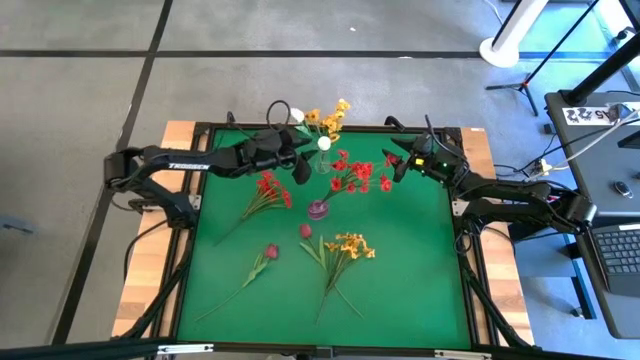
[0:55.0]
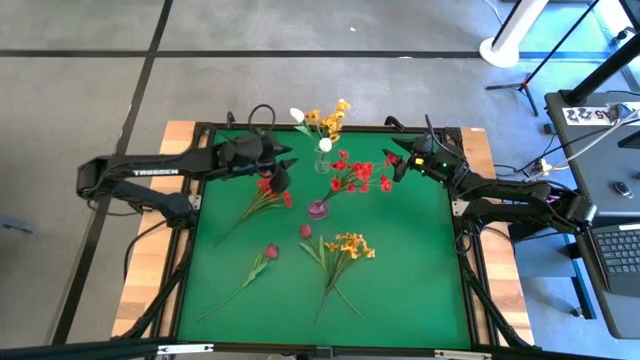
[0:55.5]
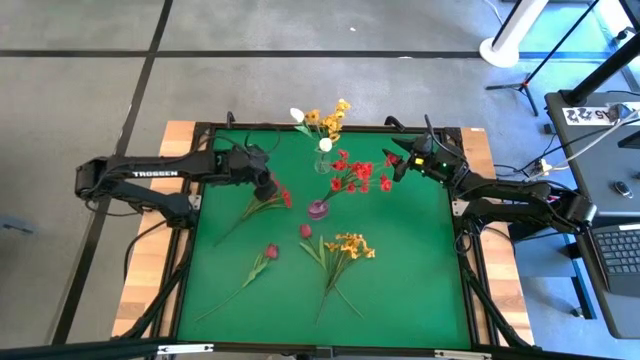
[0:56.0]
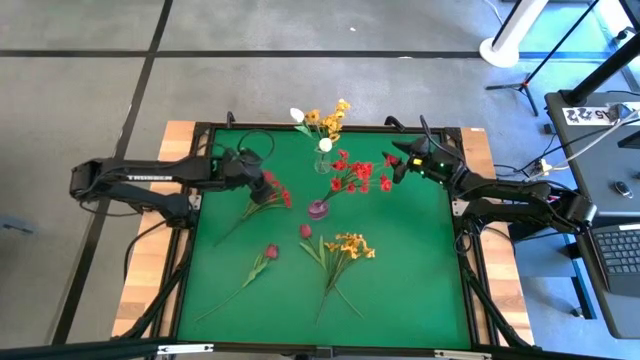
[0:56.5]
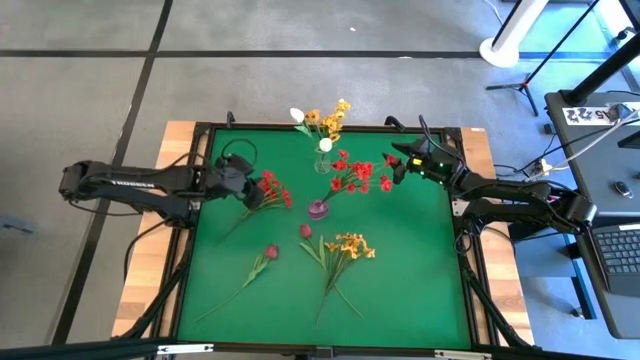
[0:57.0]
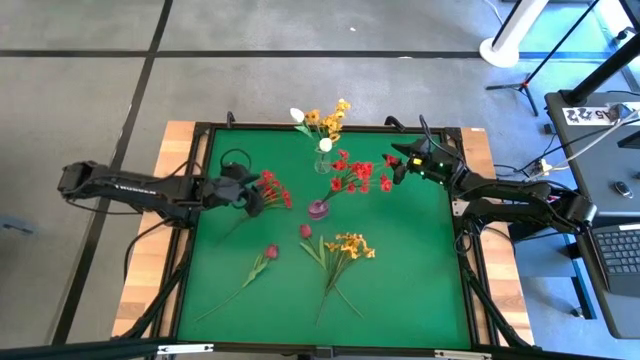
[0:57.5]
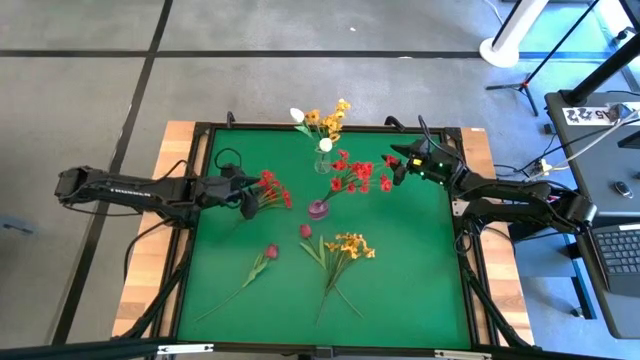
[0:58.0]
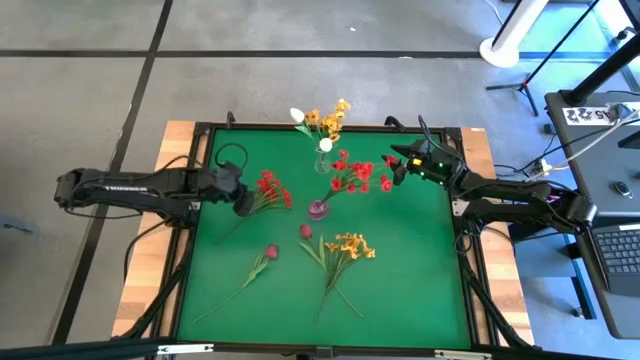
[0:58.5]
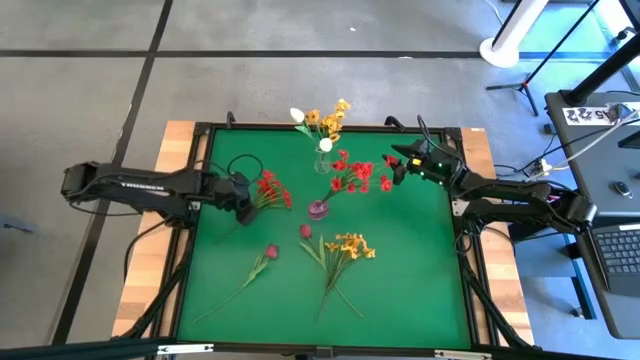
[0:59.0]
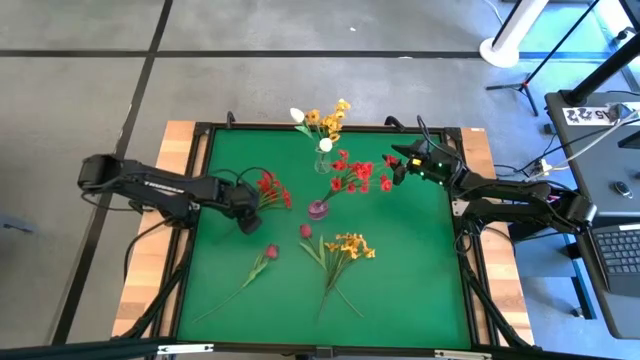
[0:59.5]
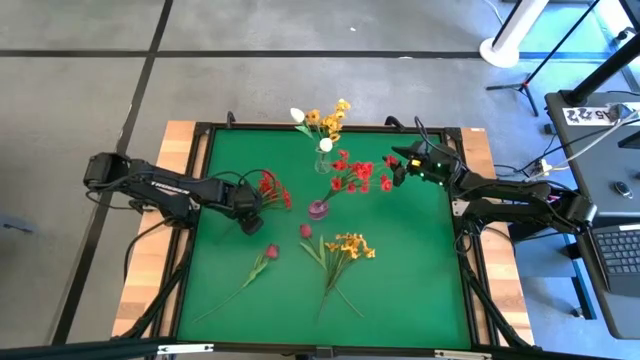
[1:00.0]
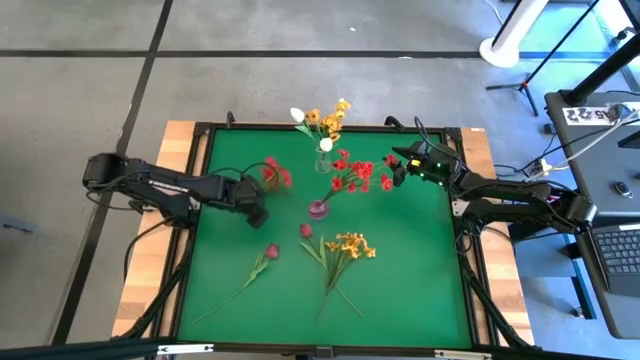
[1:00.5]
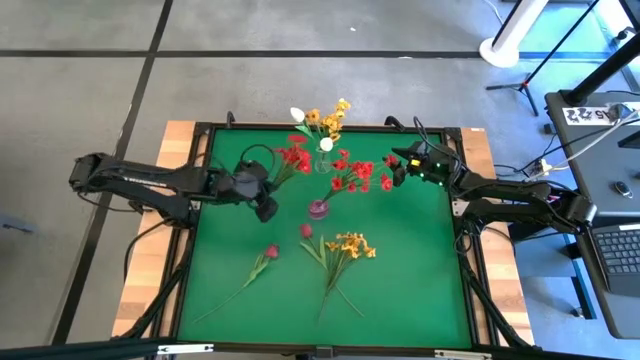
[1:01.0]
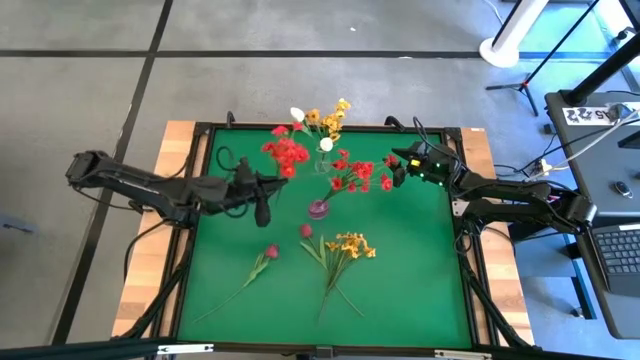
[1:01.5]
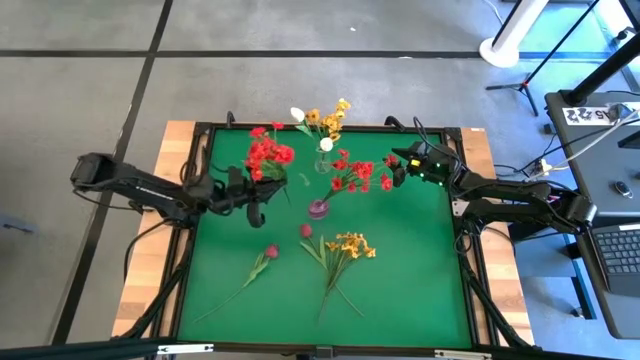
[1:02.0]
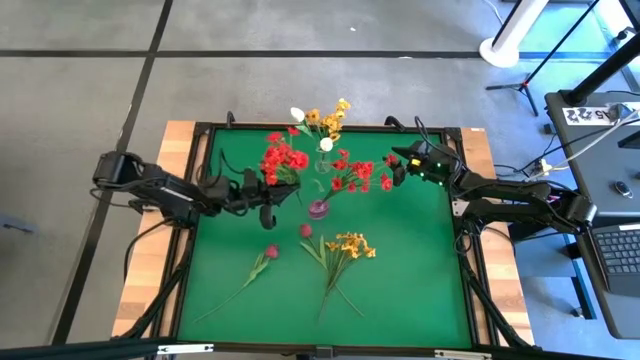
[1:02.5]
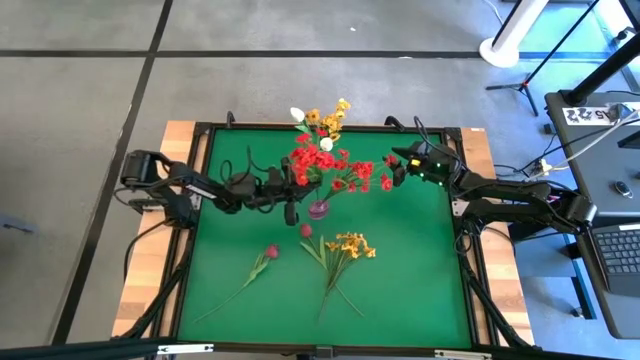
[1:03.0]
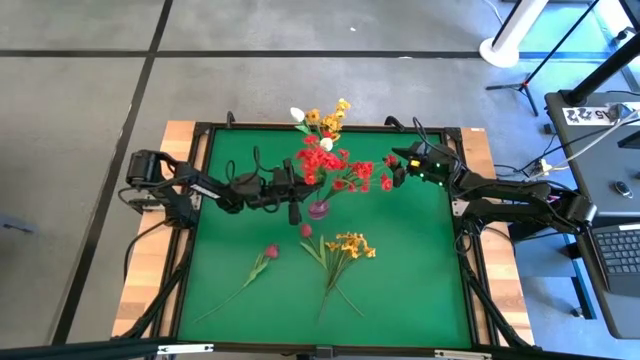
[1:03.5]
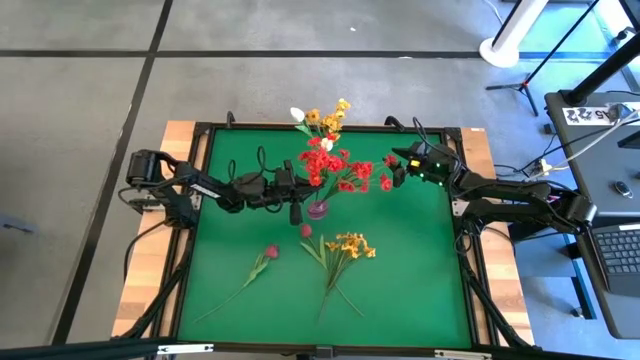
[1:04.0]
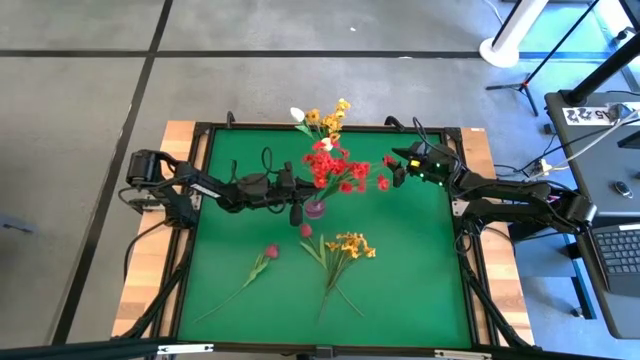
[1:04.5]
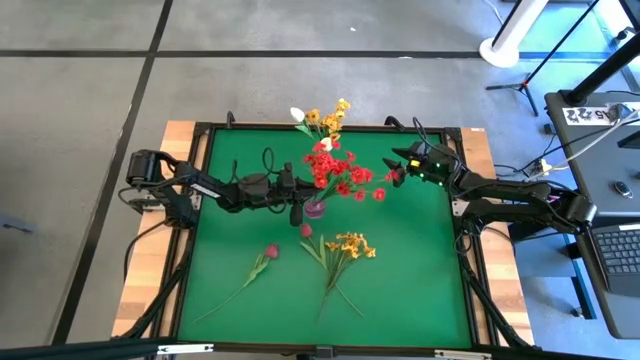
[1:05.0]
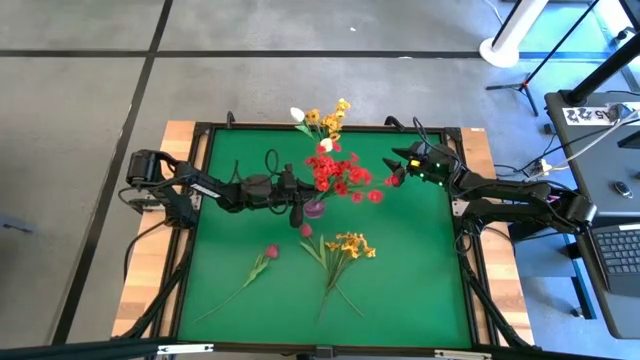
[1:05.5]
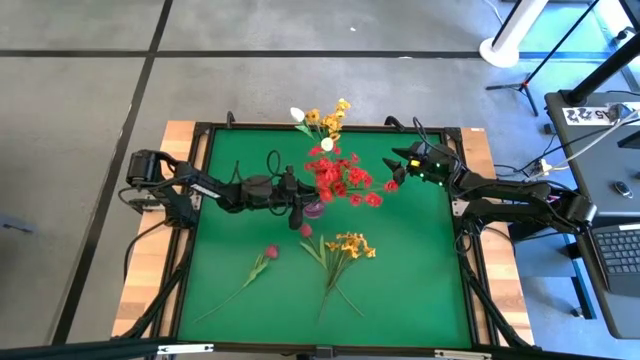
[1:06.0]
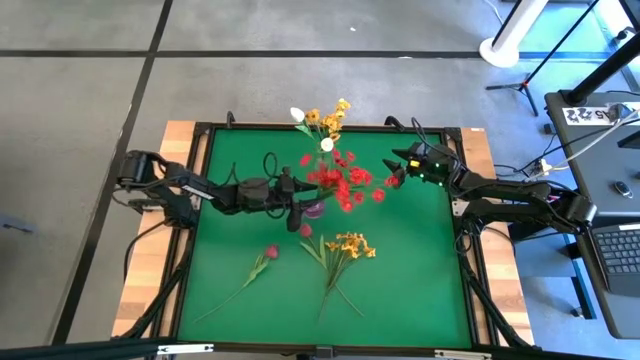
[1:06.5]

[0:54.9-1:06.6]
Task: Sort flowers into vase by color
Put the red flowers into the violet vase

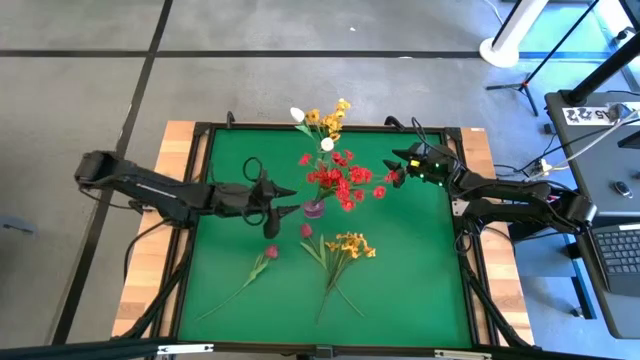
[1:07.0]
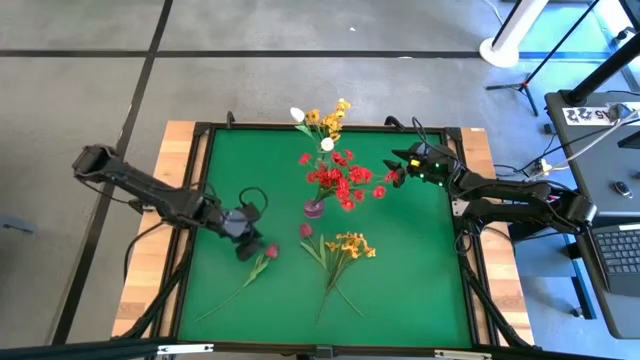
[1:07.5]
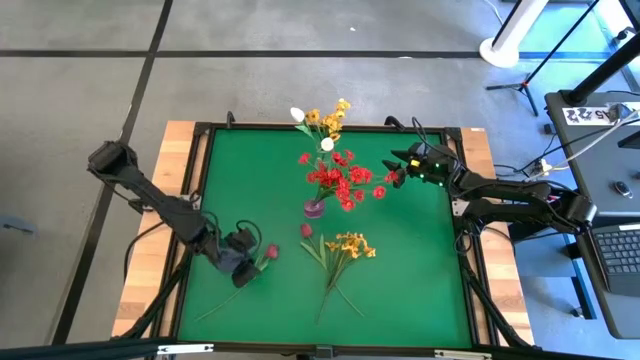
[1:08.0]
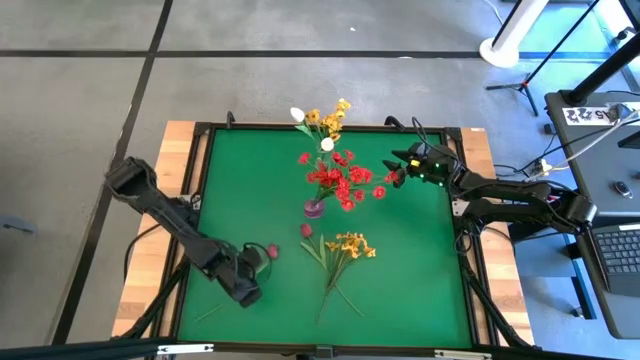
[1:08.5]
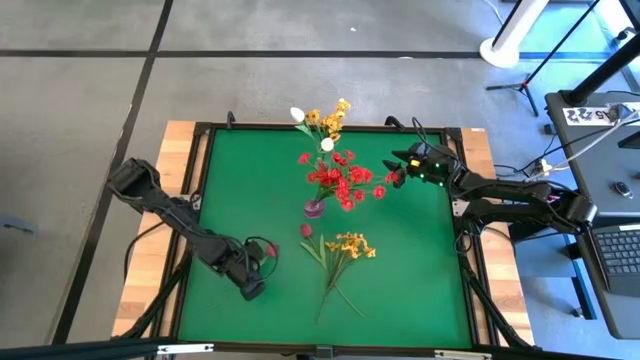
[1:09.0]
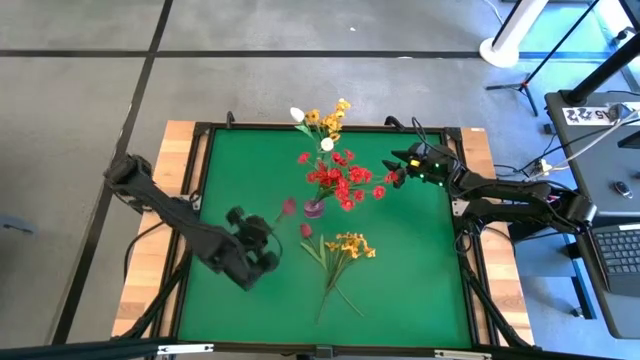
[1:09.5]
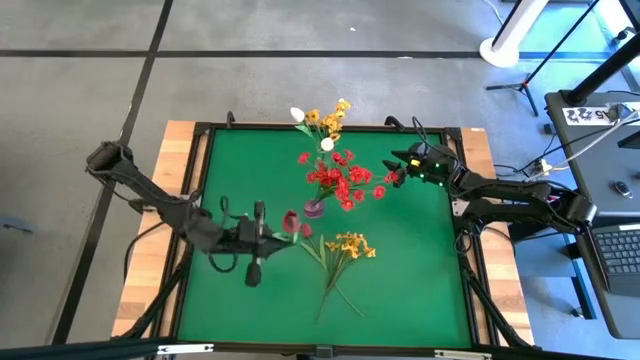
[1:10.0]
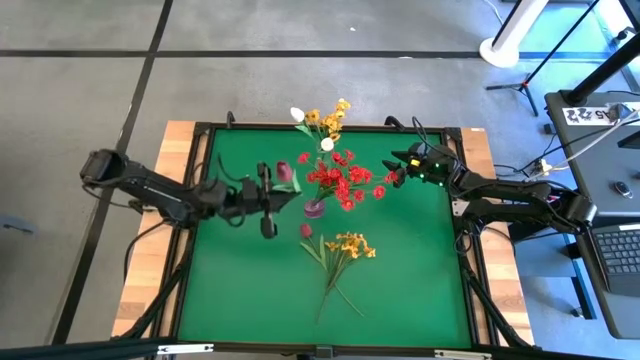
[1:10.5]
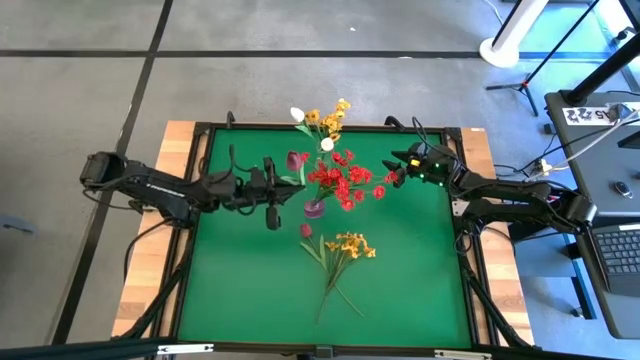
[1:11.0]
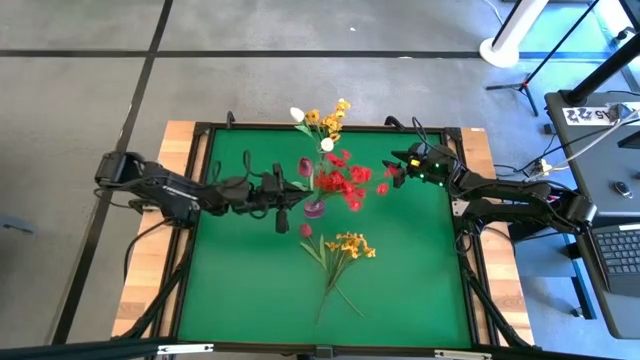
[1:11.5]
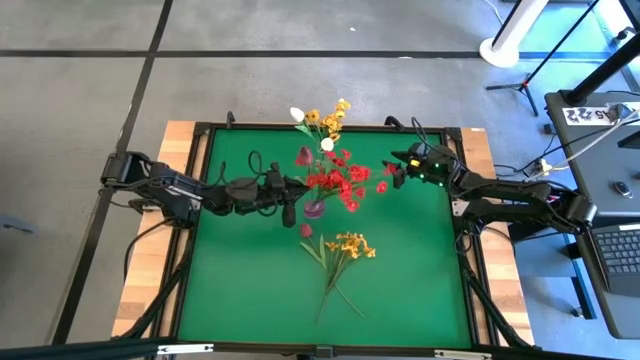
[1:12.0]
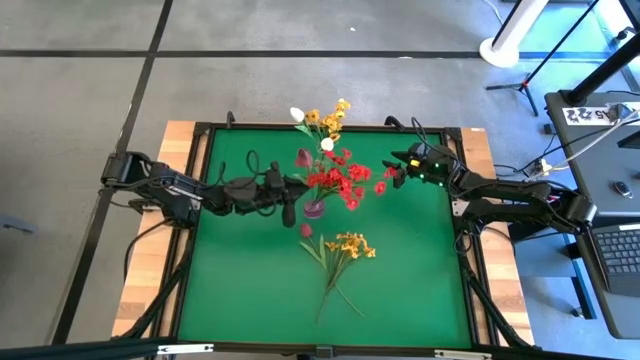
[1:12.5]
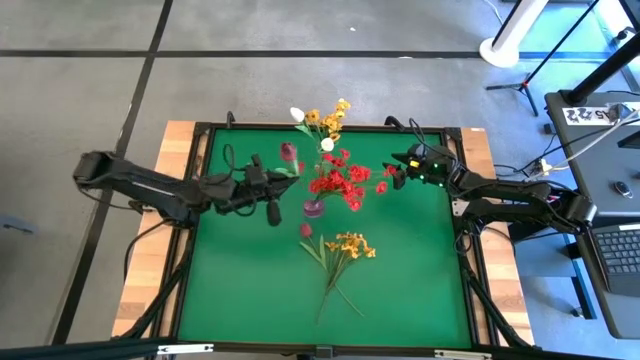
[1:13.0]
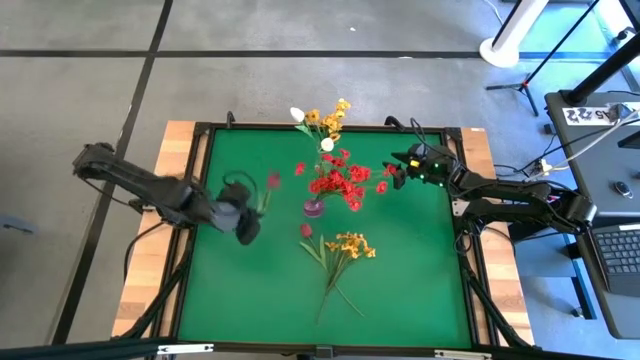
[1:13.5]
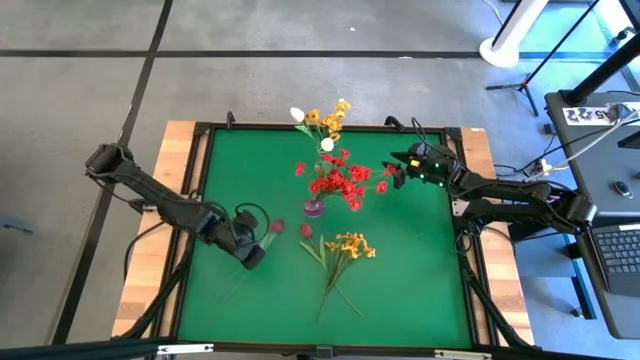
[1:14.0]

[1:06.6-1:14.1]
Put the left red tulip into the violet vase

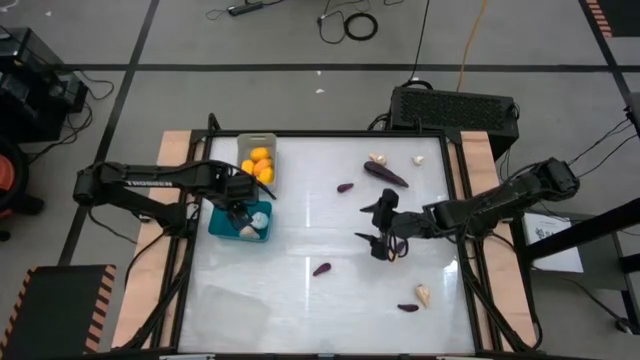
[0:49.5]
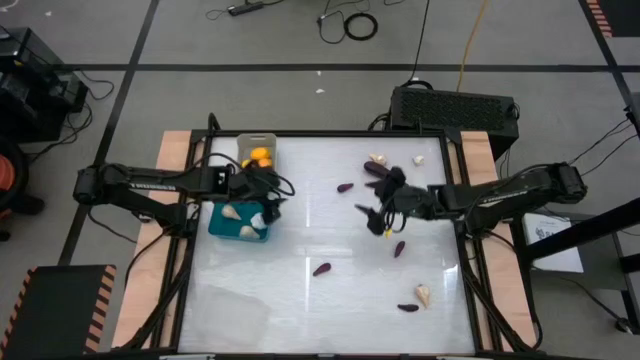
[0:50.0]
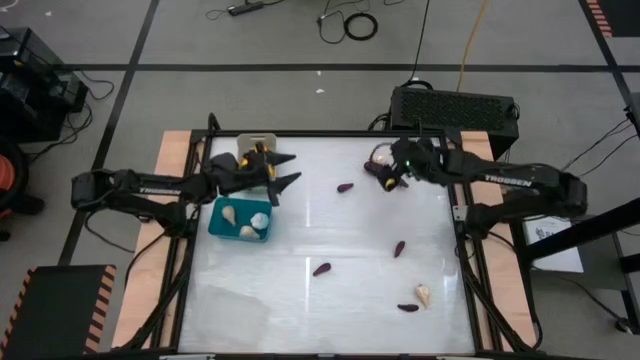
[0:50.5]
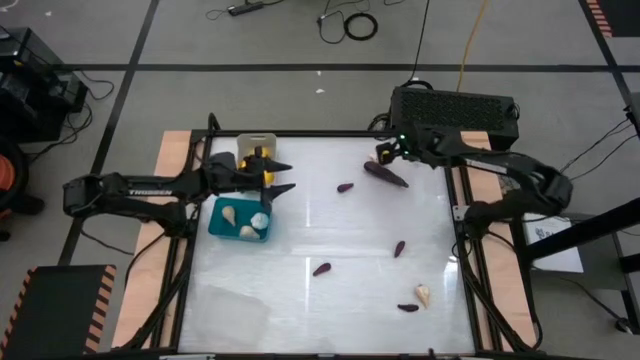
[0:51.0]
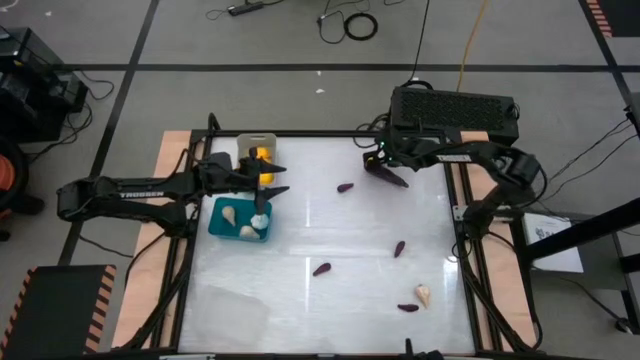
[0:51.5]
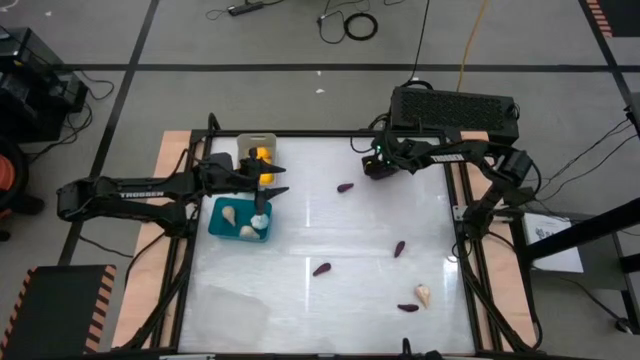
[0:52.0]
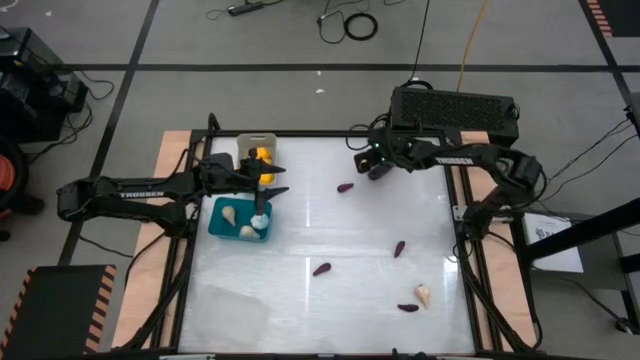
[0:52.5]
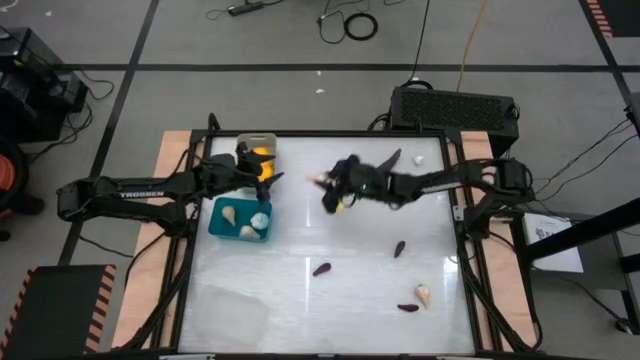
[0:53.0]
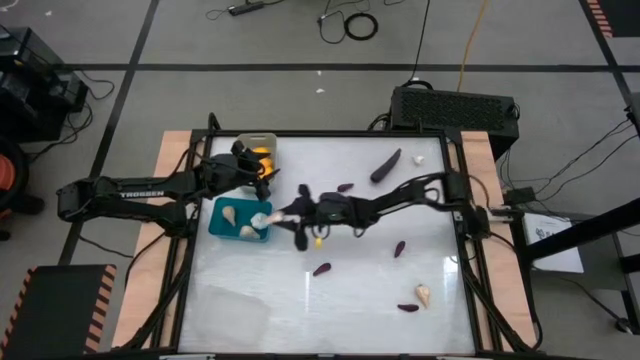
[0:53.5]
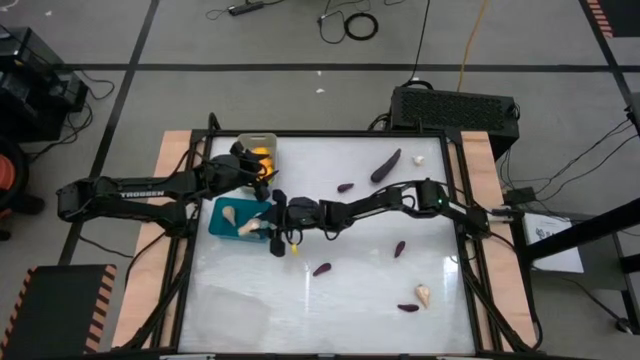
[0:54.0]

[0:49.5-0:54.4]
Task: Sort produce into baskets
Put the white garlic into the blue bin
